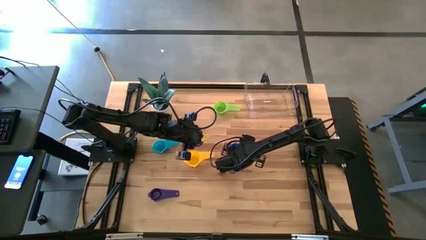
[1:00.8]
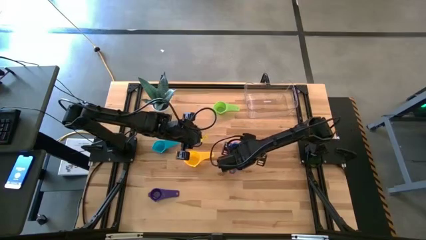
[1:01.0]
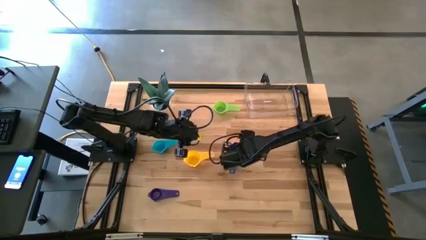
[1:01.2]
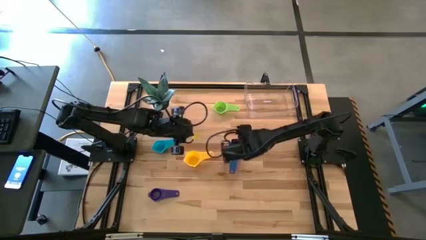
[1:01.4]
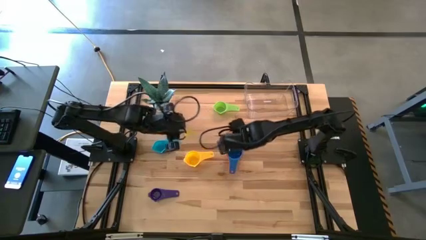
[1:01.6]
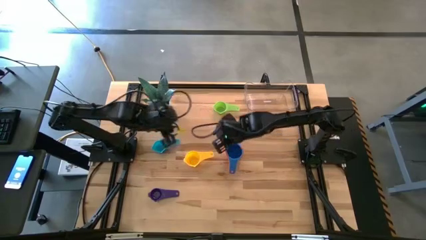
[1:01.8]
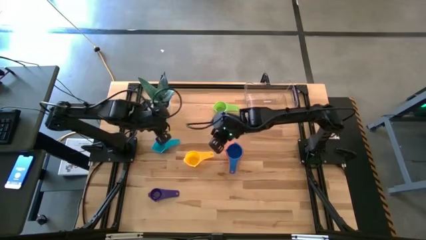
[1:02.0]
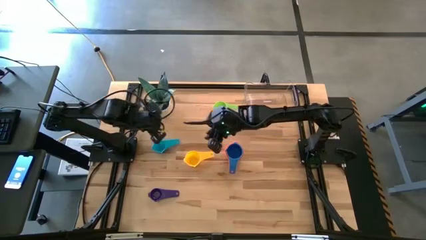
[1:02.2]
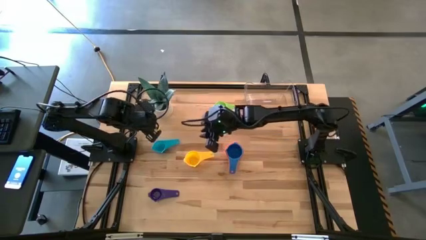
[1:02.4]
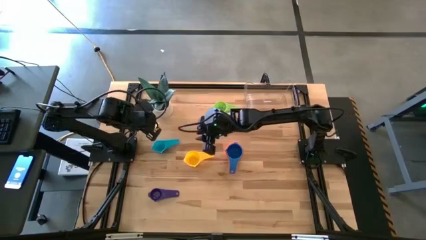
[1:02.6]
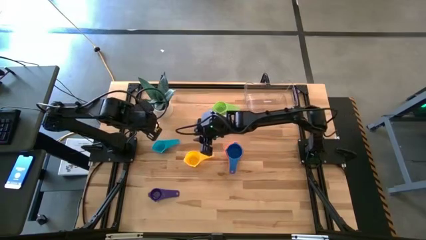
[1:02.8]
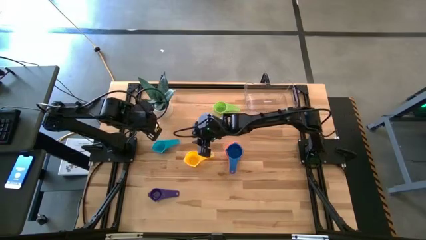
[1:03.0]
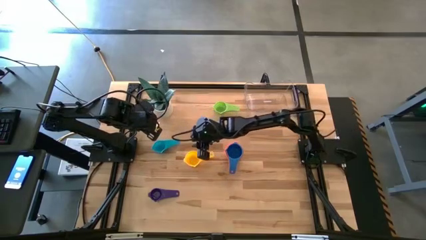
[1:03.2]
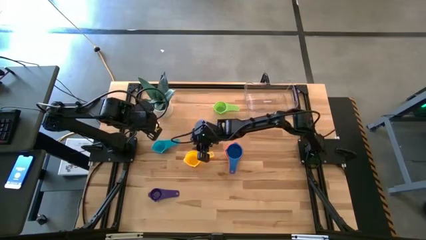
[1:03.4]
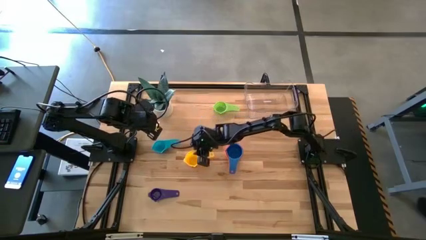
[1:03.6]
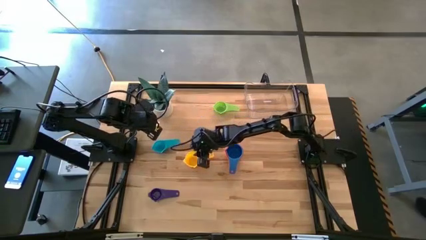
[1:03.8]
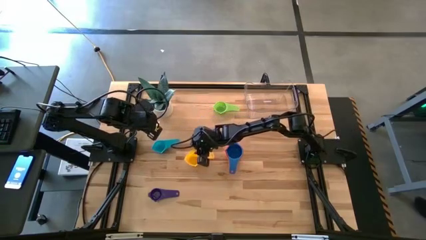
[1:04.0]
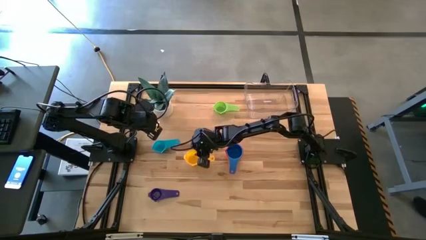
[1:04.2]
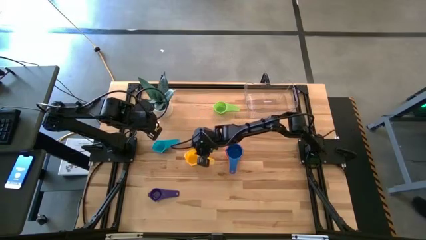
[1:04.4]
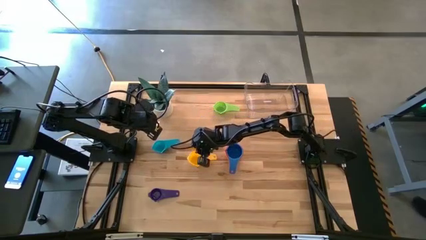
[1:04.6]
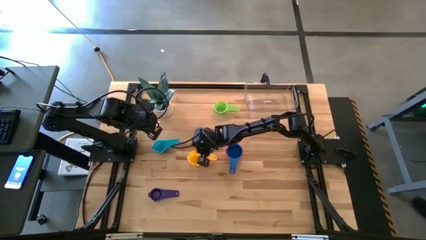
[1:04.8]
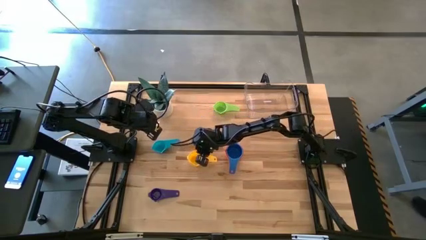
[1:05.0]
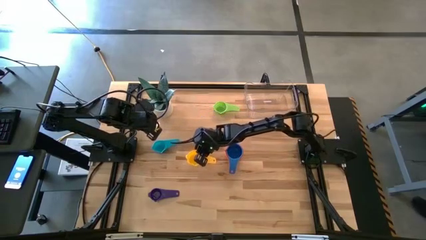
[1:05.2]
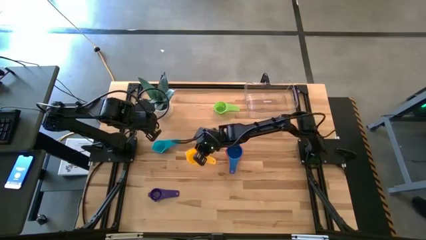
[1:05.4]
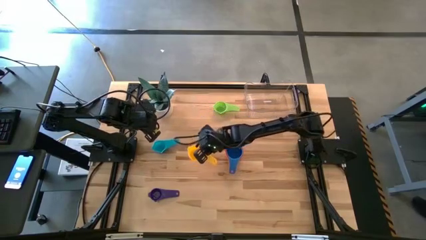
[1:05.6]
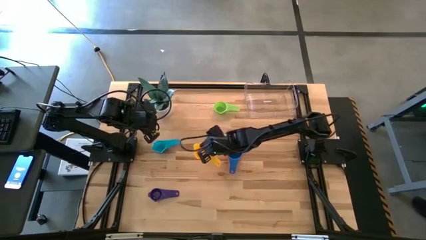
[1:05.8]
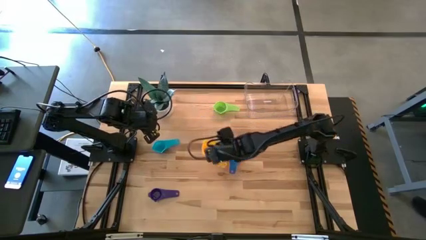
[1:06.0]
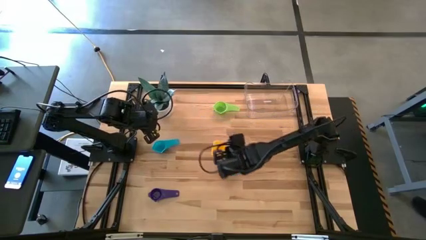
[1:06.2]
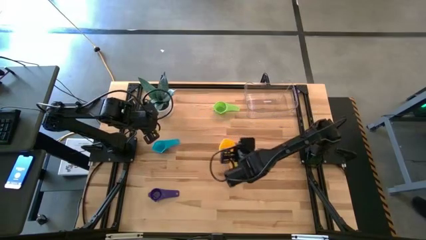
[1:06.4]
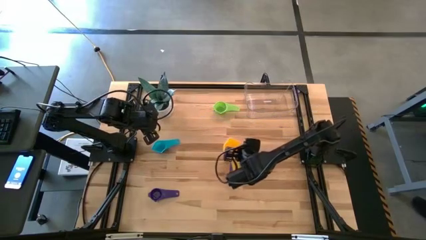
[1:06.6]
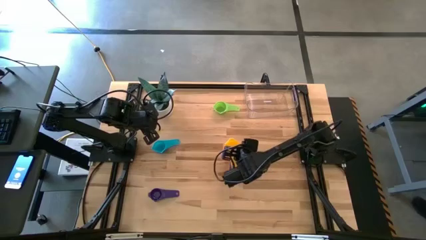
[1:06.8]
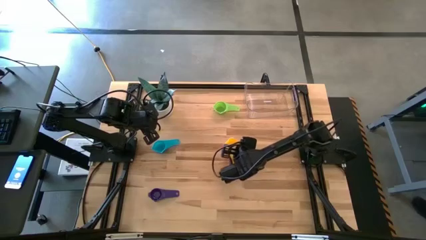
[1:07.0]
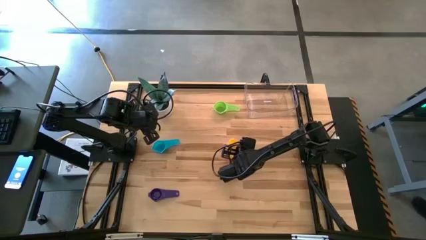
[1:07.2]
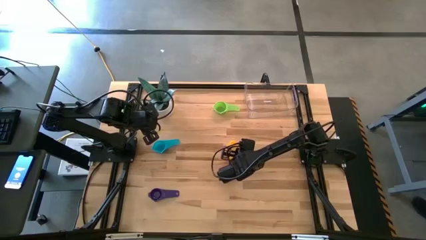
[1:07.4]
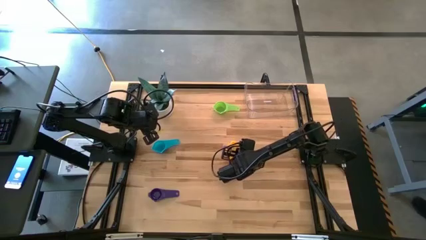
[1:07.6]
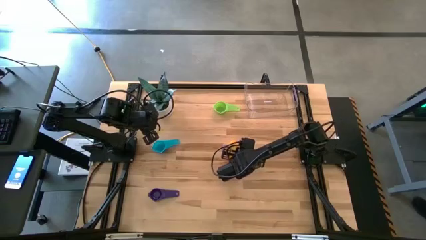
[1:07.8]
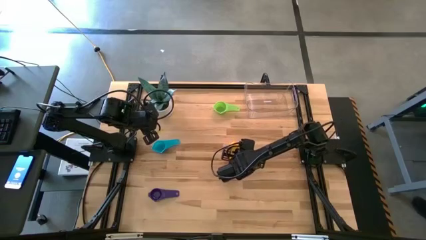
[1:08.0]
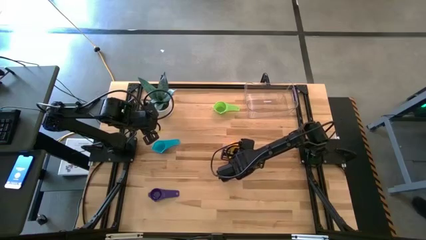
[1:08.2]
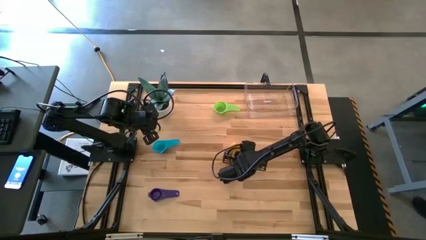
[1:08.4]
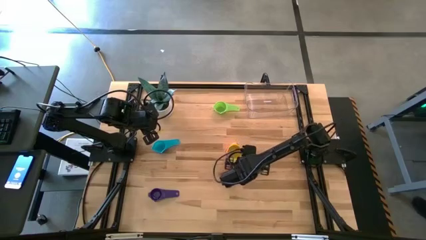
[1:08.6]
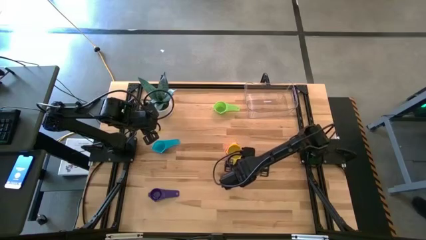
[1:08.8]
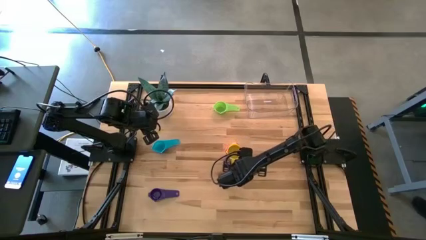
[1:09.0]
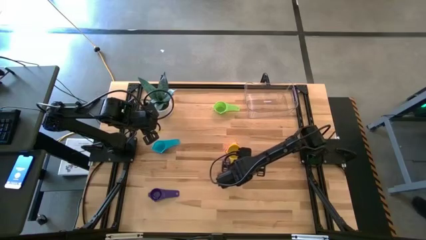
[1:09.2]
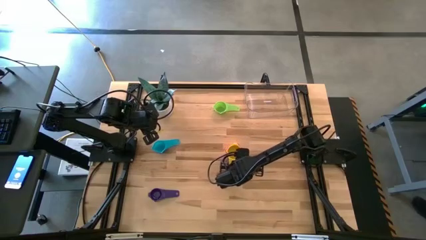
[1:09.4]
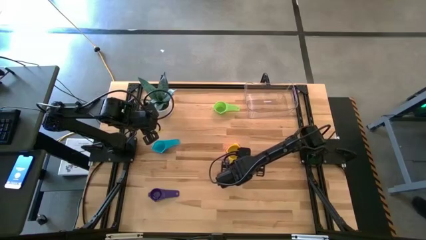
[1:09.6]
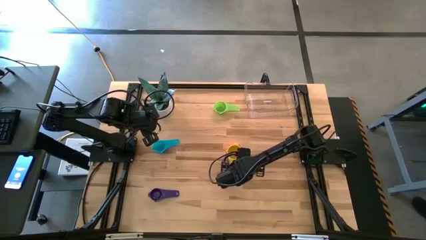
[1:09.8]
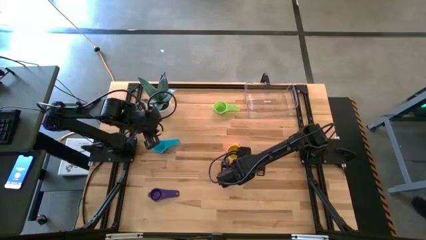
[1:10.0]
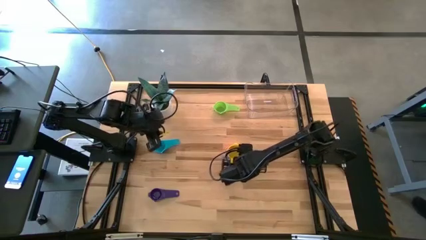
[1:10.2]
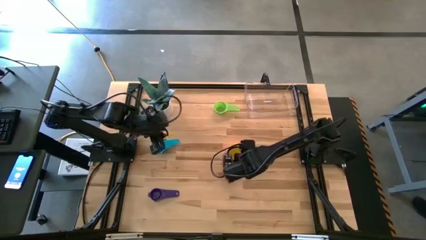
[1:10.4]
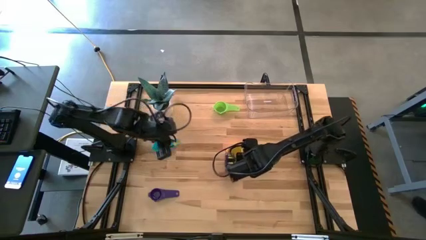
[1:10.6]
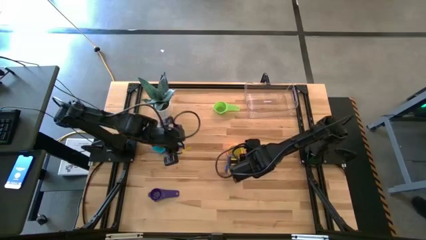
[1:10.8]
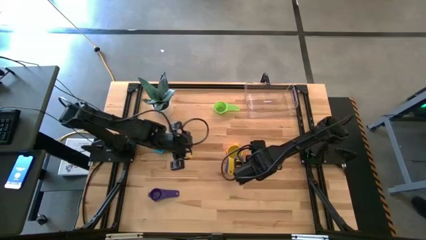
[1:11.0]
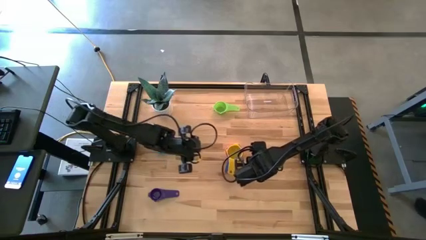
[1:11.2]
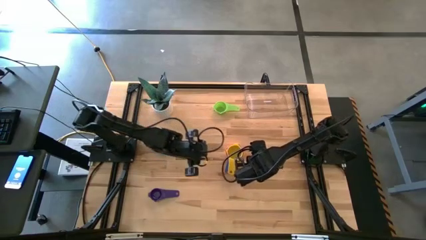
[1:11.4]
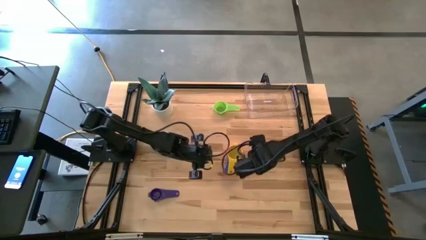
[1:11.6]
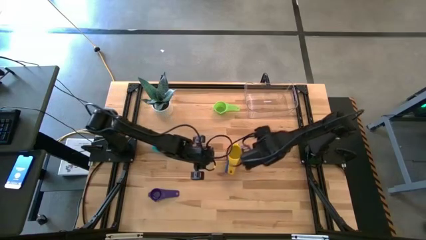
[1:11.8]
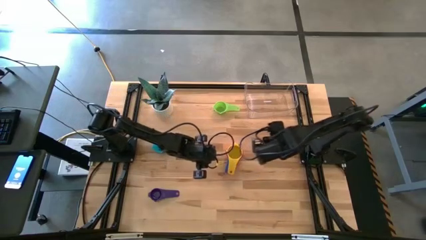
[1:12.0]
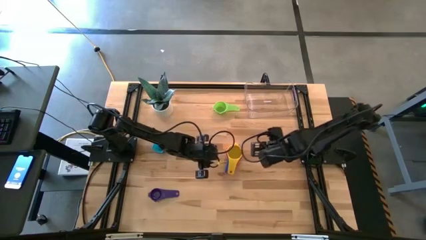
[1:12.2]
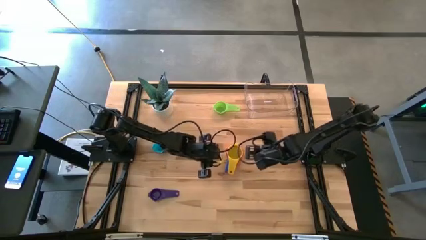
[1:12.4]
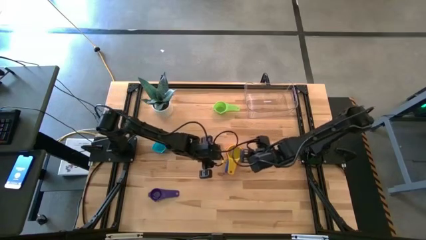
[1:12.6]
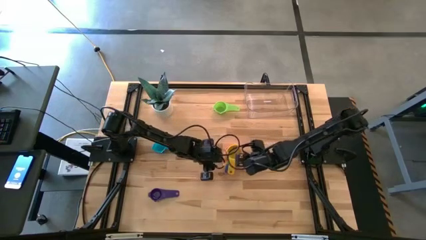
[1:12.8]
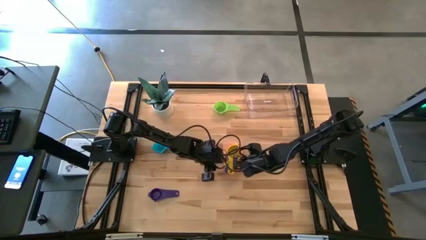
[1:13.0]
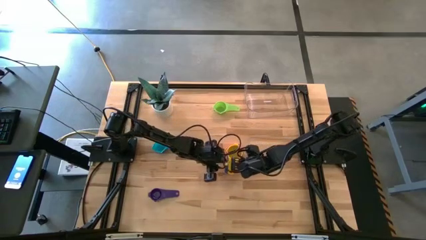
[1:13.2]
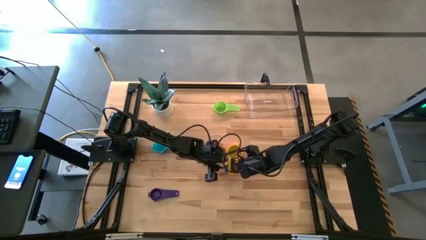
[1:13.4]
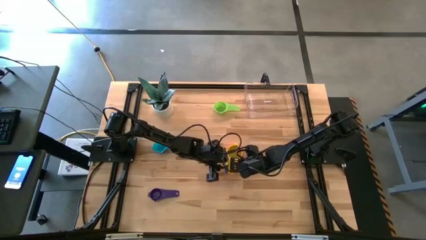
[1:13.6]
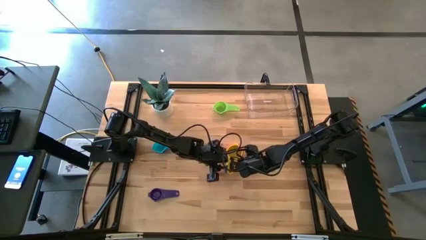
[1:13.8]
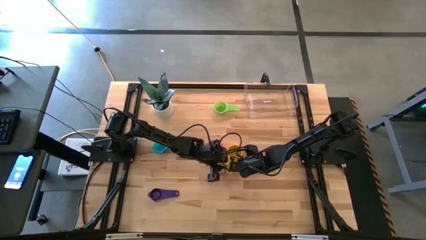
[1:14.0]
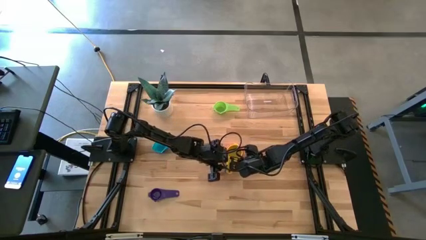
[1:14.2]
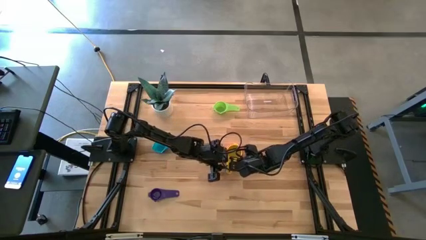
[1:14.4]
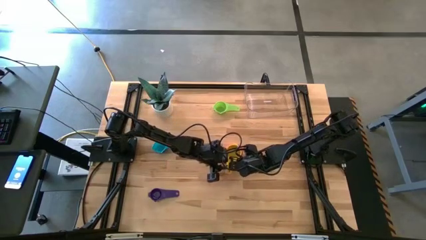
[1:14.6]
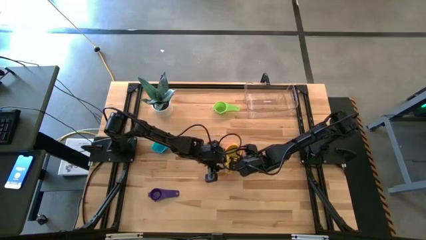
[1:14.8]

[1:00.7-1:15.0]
Task: Nest measuring cups in basket
Stack the yellow measuring cup on top of the blue measuring cup

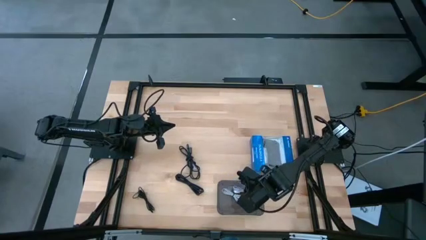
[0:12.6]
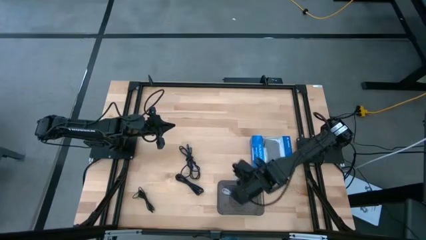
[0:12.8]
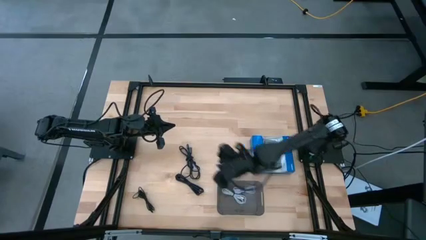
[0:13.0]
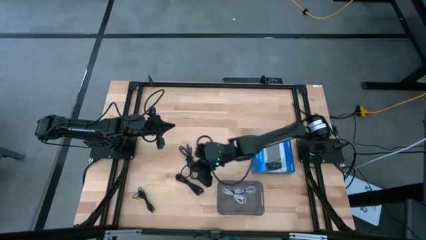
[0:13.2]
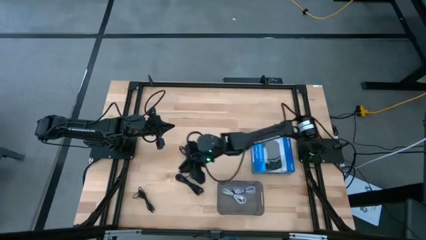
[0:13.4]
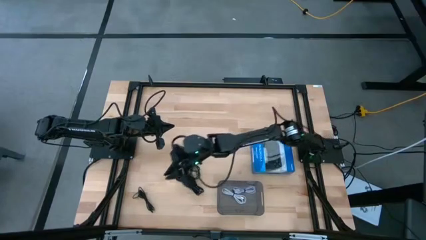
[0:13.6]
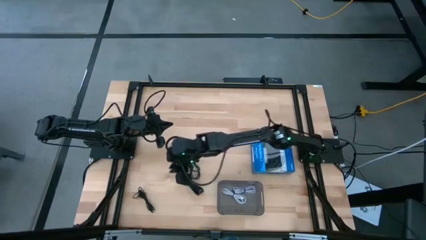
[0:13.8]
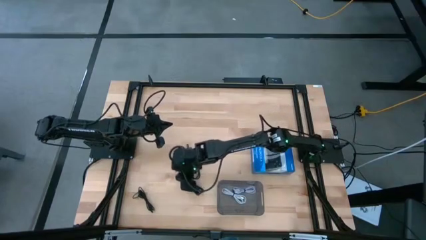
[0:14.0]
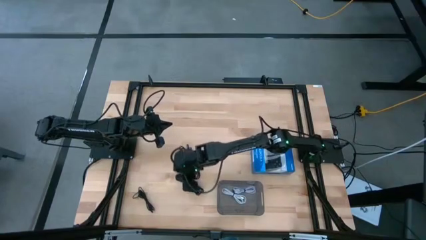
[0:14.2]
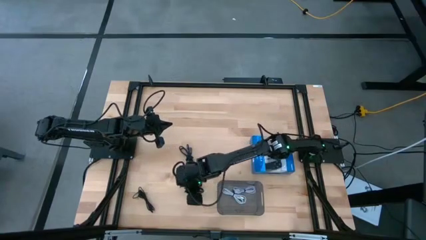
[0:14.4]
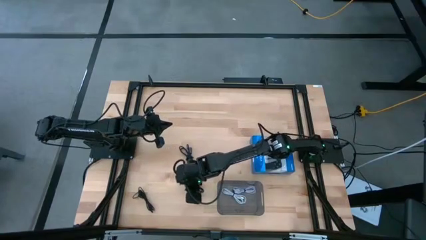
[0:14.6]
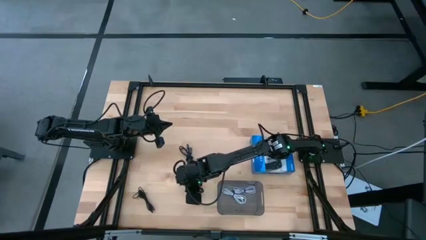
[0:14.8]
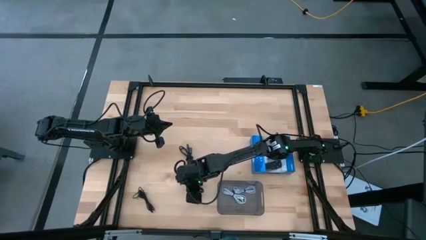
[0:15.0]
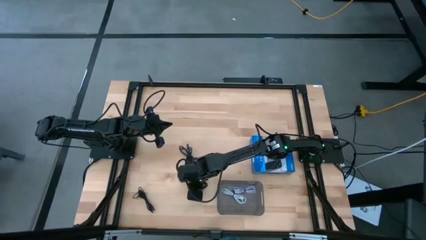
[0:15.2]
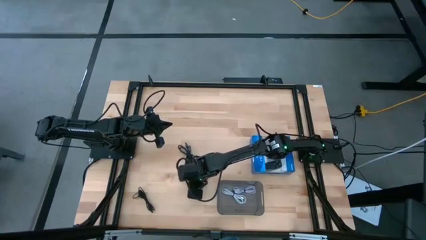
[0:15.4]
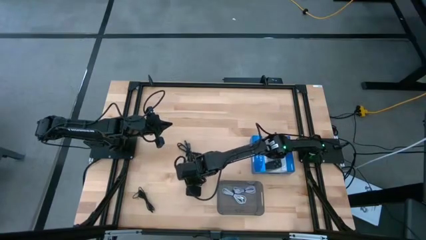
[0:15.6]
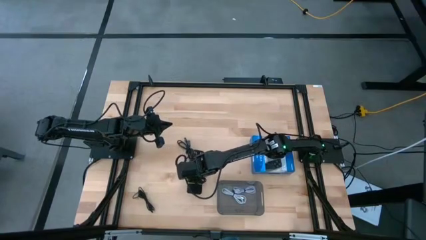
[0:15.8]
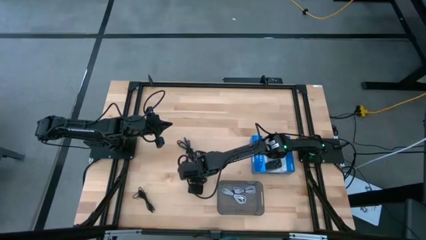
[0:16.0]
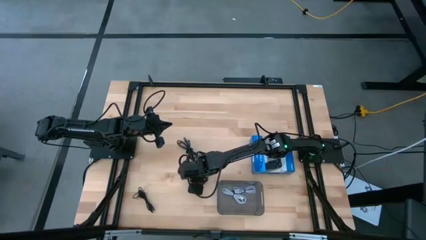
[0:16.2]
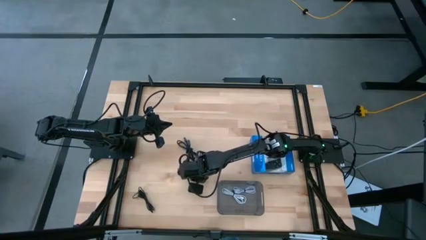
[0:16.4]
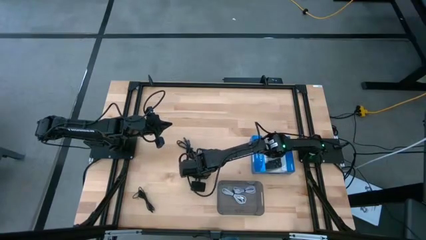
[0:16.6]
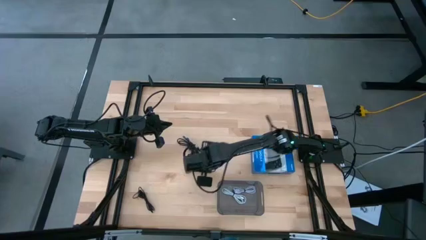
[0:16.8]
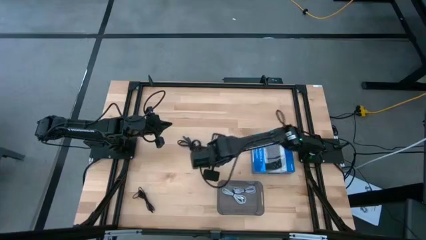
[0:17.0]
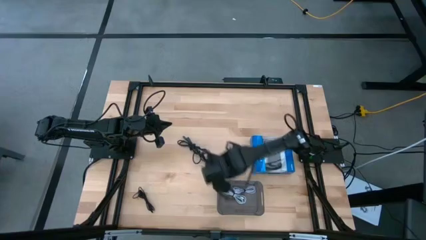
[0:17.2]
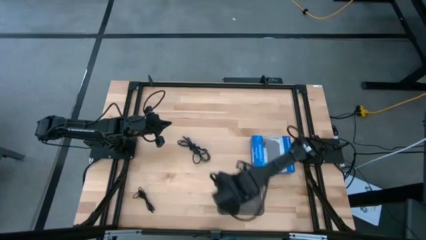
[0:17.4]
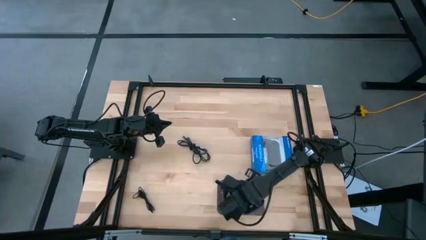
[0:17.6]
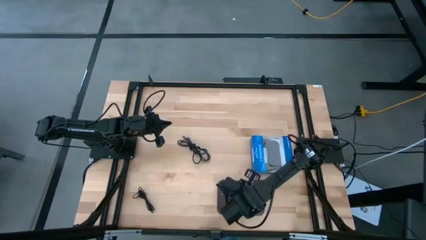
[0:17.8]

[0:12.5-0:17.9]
Task: Pick and place USB-C Cables
Put the middle black charger cable into the black bin
